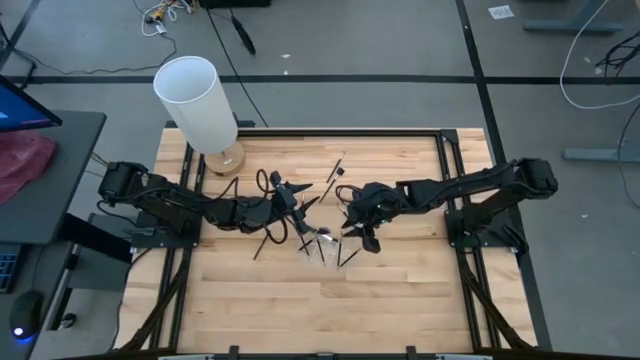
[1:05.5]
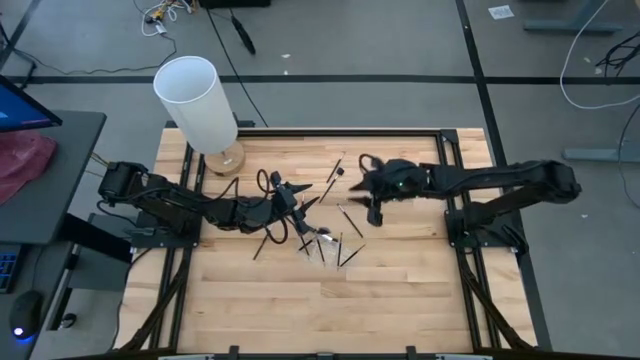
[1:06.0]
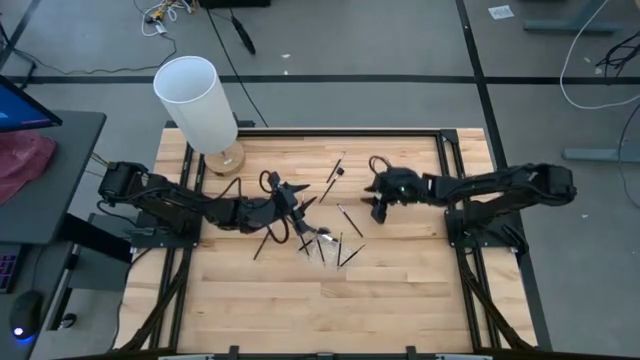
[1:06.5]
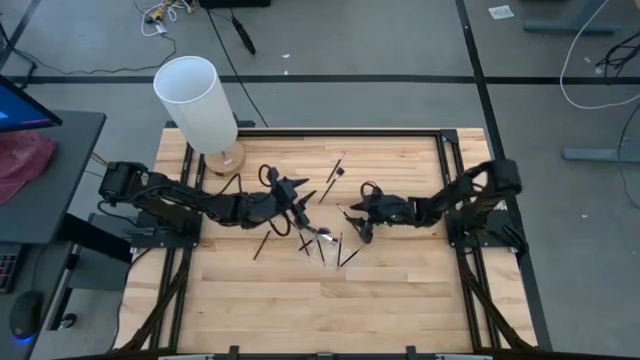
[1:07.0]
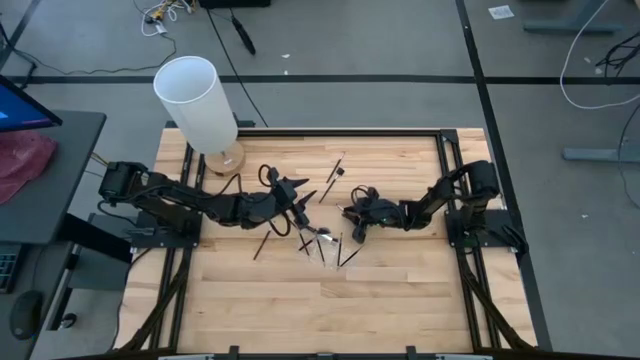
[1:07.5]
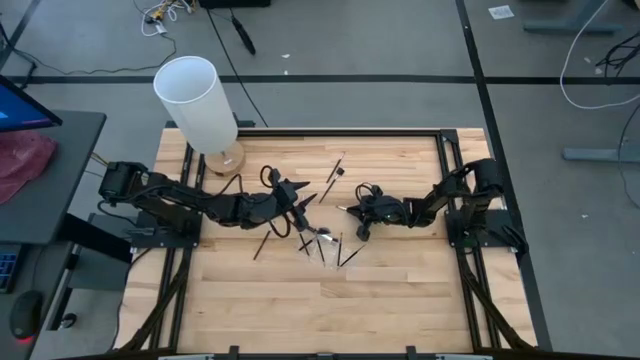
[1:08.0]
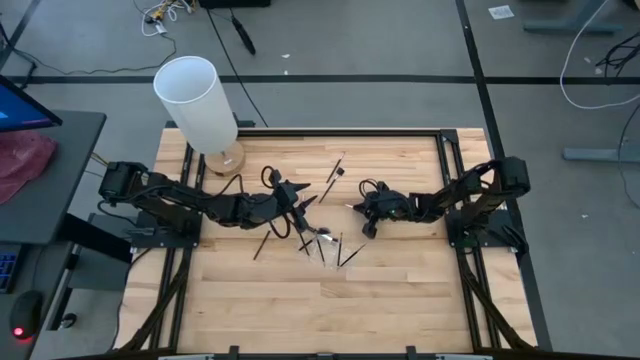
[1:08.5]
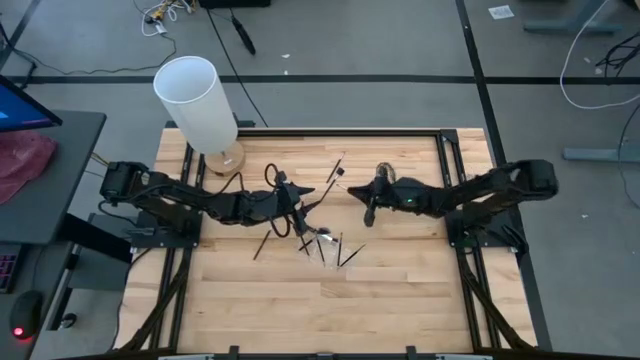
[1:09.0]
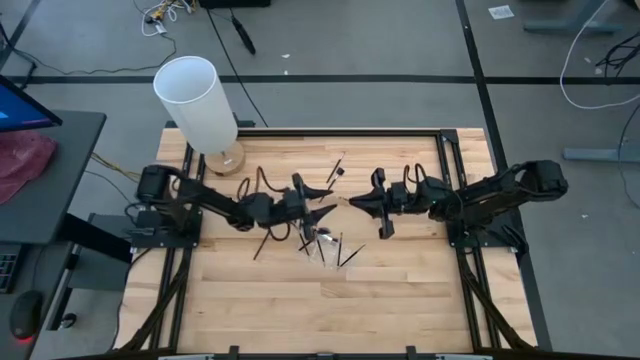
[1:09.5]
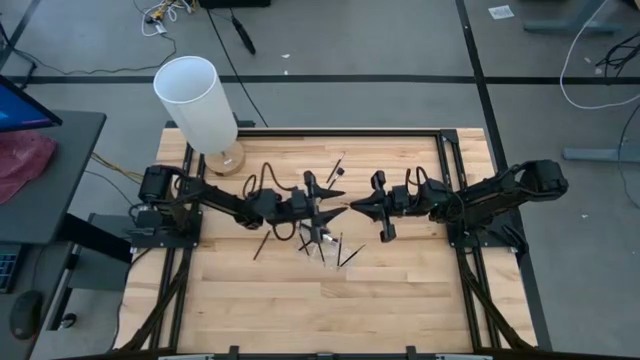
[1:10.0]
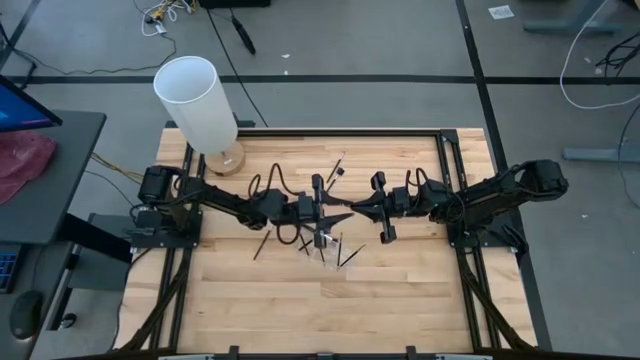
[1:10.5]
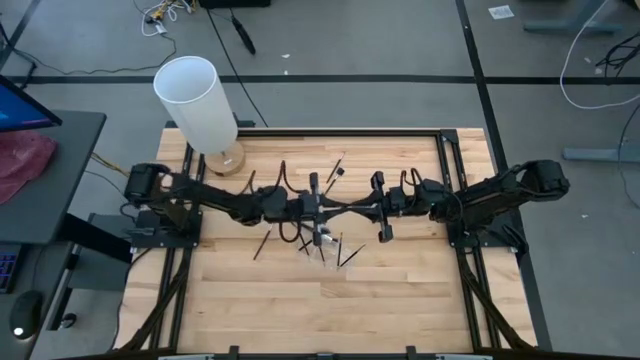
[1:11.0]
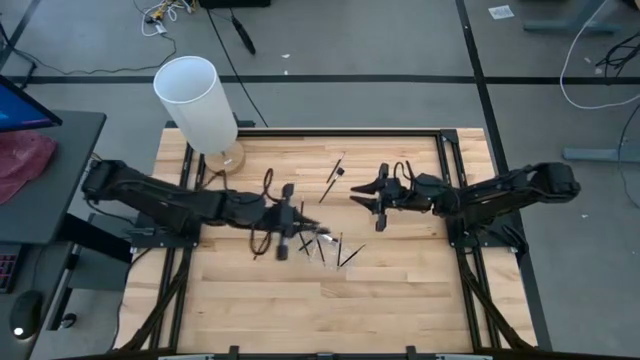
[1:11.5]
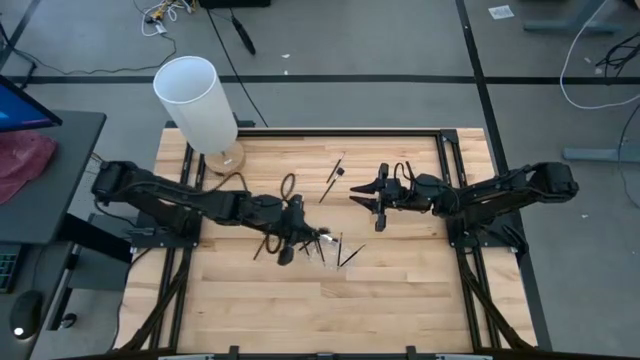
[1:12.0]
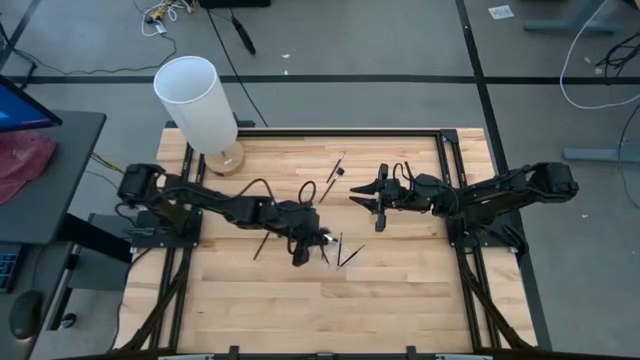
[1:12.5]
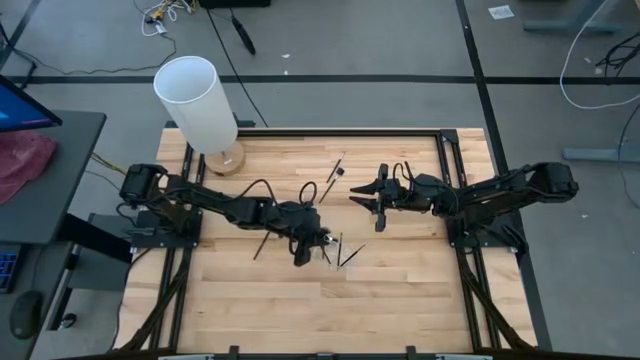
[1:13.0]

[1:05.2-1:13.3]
Task: Put items in baskets/containers
Put the black eyeshadow brush into the transparent organizer

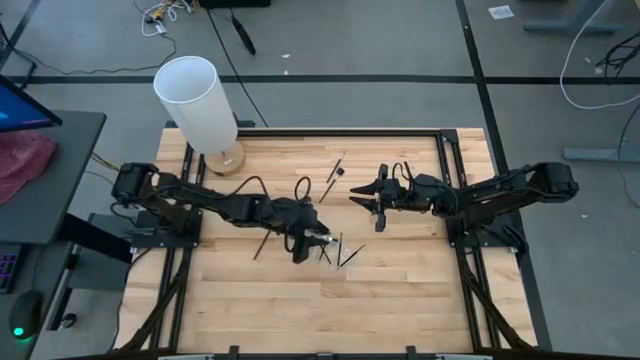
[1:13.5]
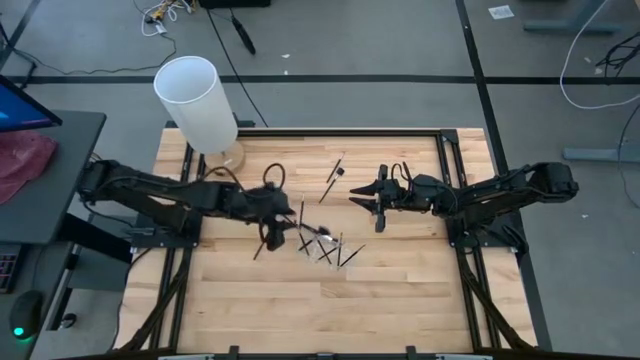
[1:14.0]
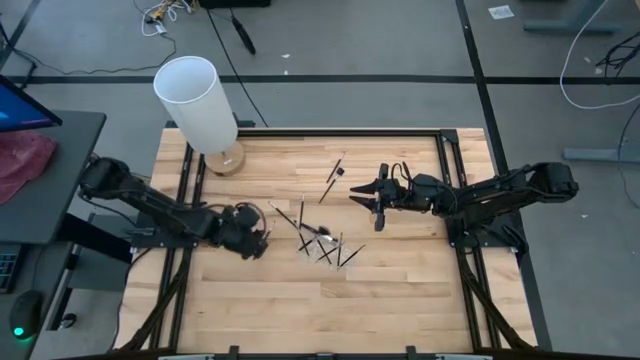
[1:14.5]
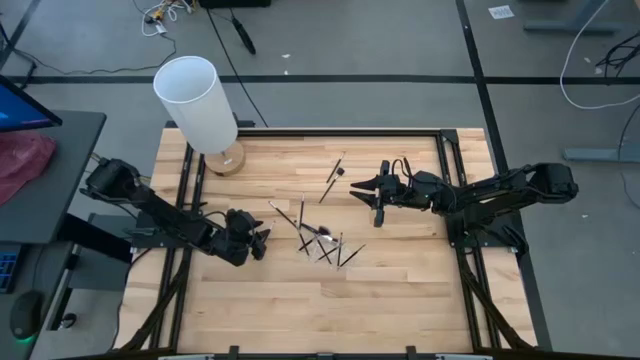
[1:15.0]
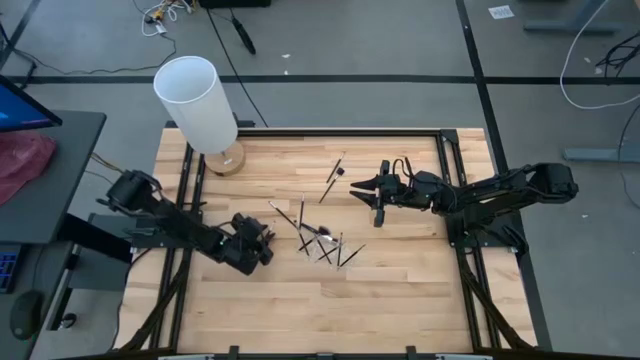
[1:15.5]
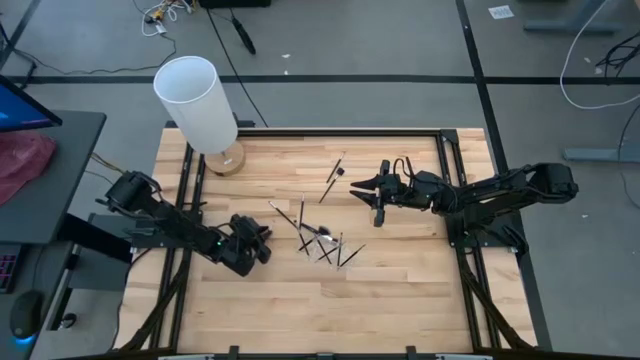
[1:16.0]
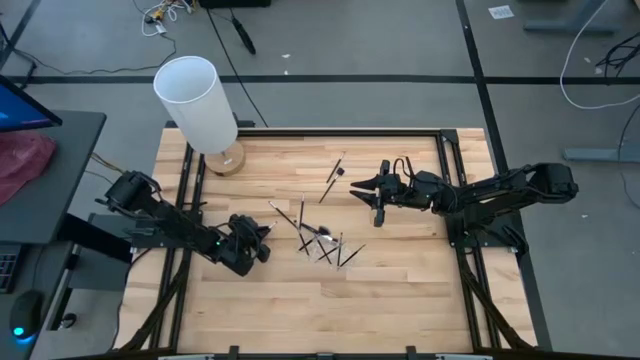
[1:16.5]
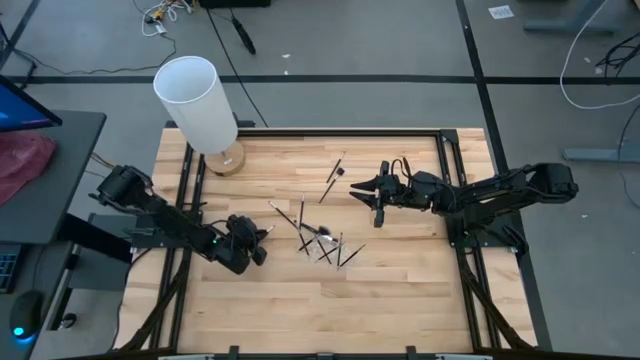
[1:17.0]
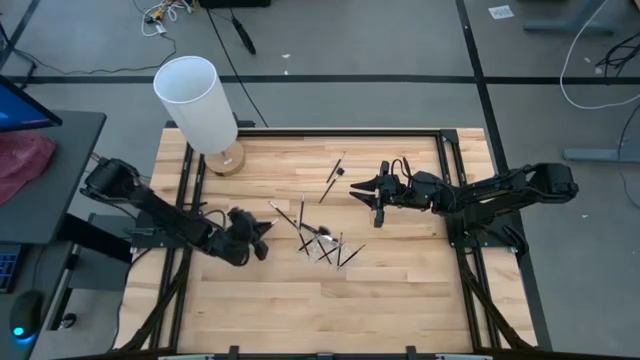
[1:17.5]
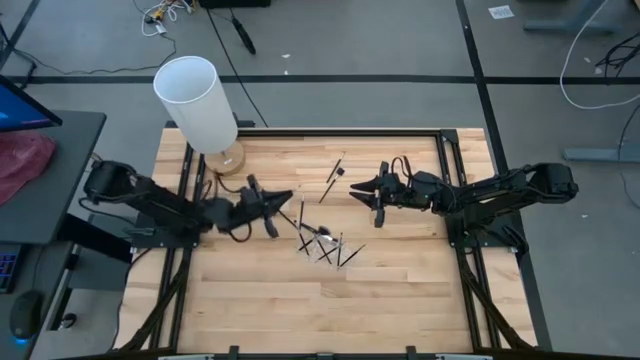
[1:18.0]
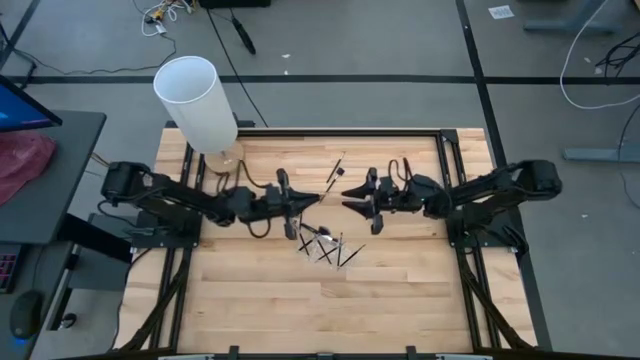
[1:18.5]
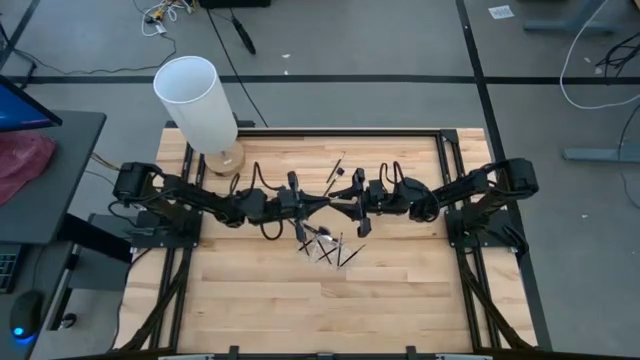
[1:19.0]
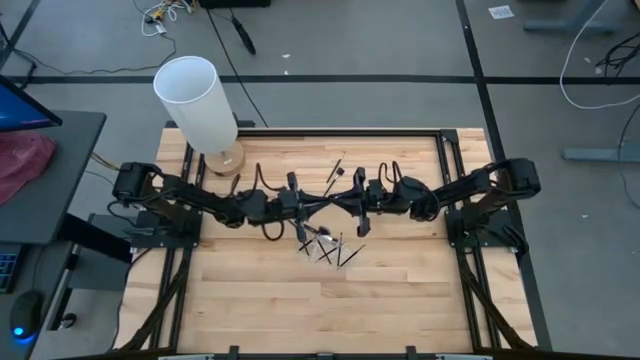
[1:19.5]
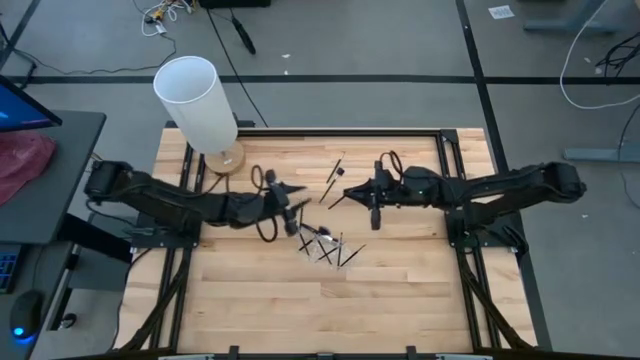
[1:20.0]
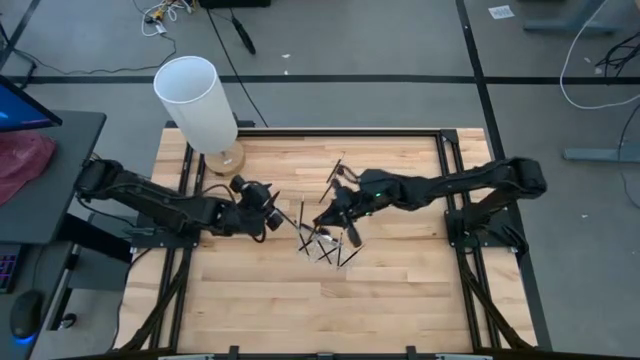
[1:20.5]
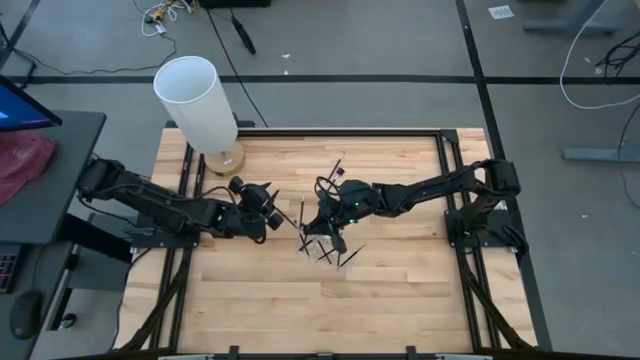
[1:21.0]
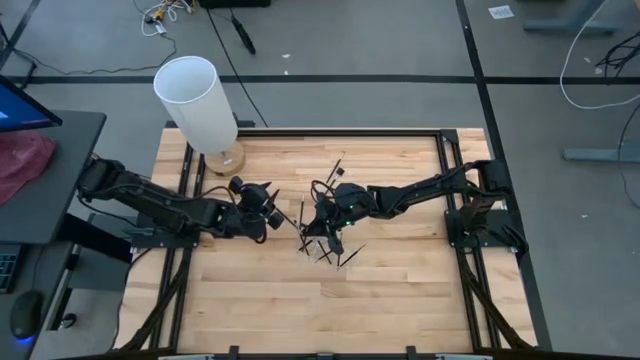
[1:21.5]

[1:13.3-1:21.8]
Put the black eyeshadow brush into the transparent organizer

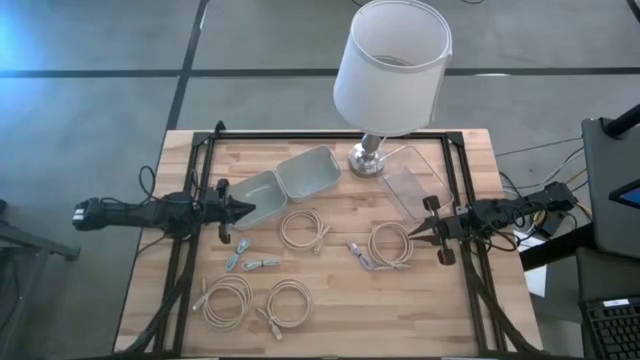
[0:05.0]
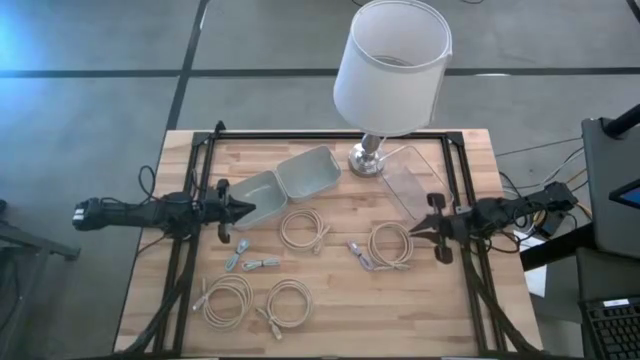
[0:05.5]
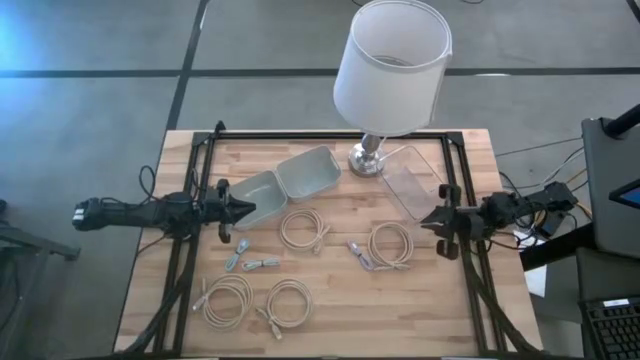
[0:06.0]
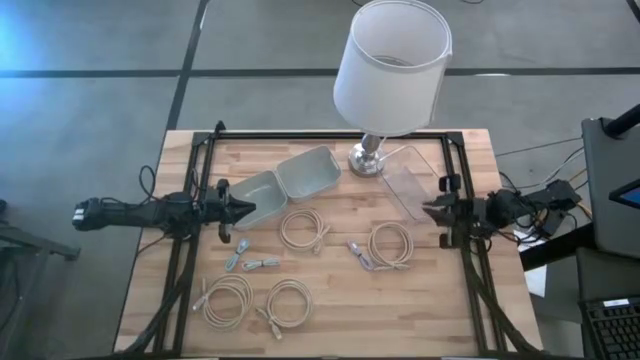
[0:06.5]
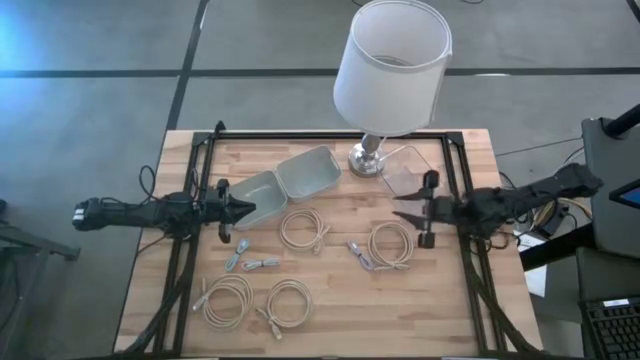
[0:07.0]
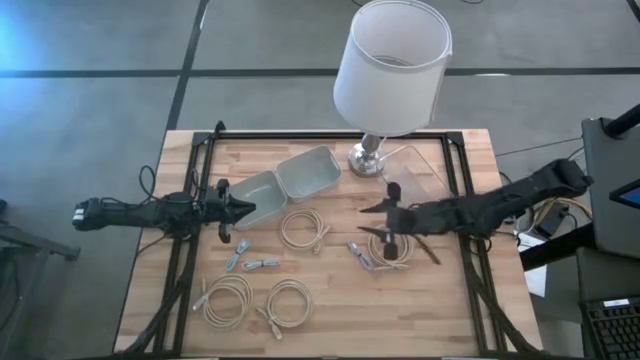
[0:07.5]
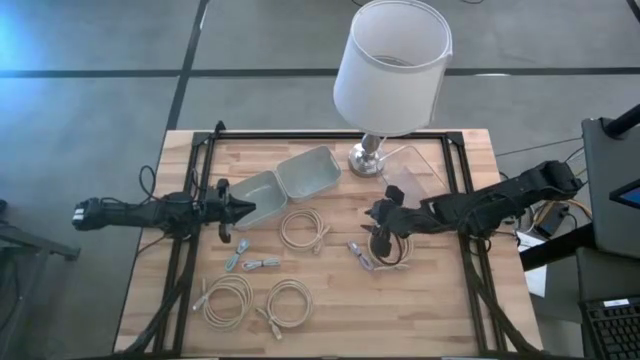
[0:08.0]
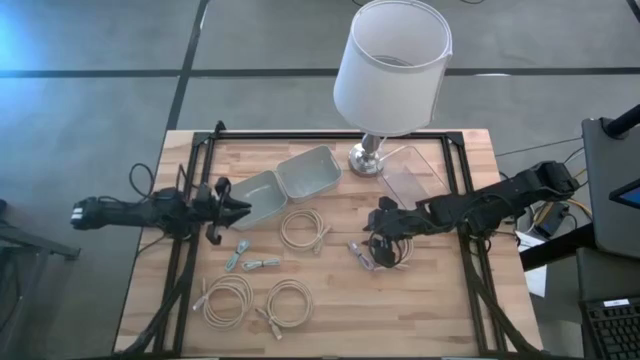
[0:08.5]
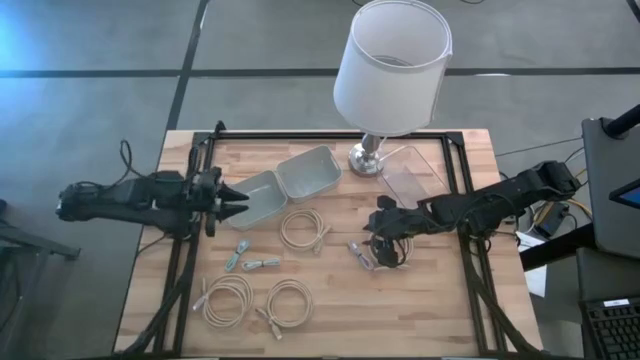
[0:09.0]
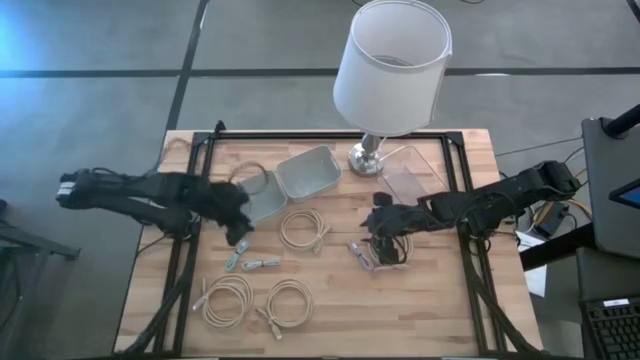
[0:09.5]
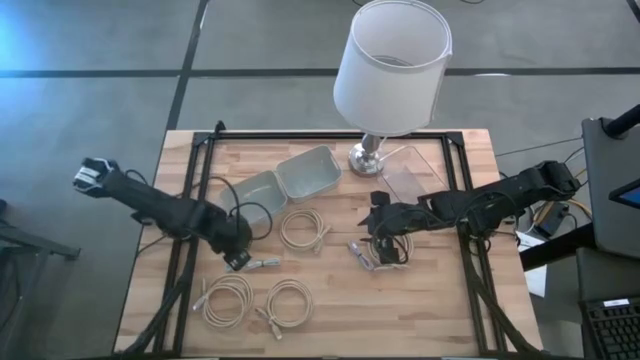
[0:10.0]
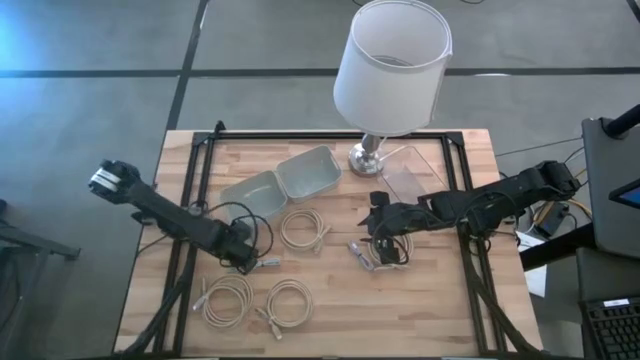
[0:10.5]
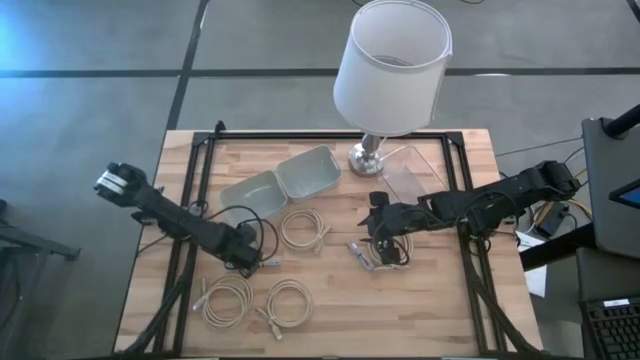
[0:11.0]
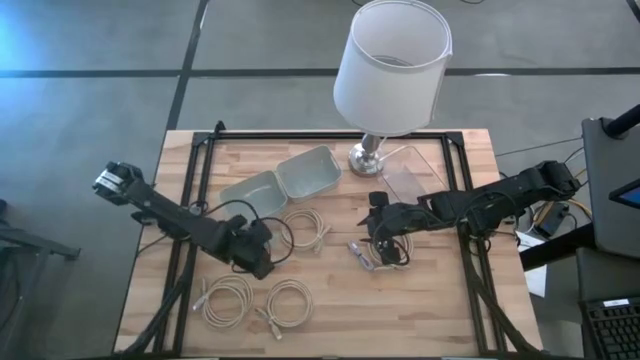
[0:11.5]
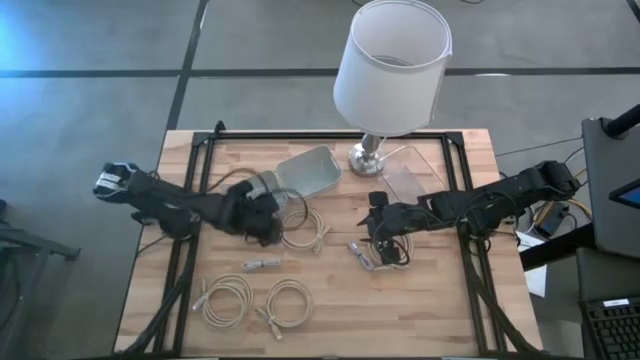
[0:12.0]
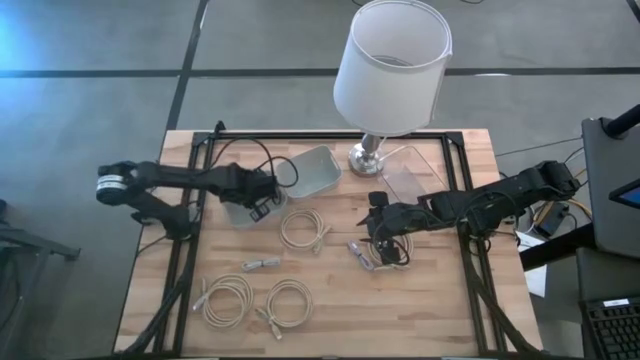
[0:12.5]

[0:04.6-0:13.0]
Task: Pick & Place USB Port
Put the blue USB cable into the left white bin
